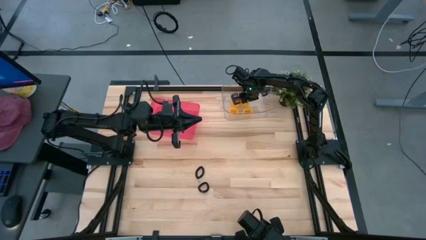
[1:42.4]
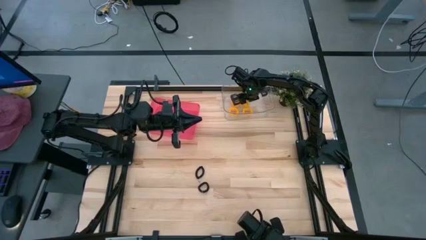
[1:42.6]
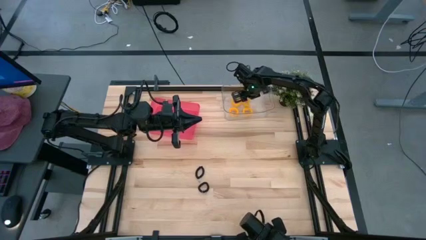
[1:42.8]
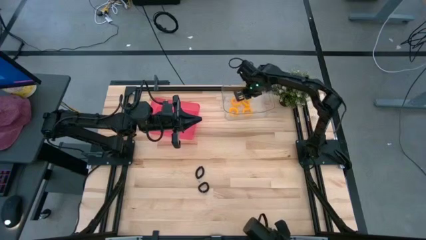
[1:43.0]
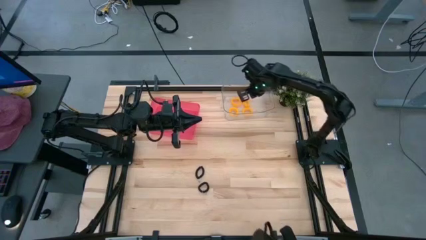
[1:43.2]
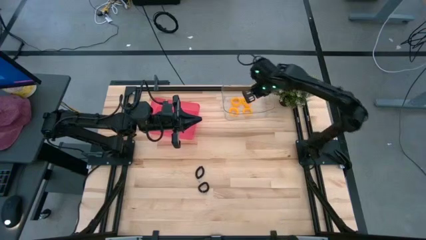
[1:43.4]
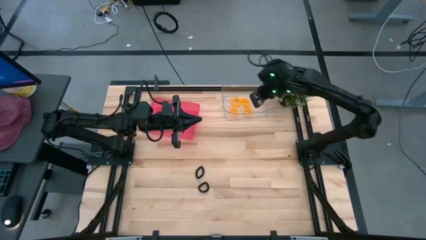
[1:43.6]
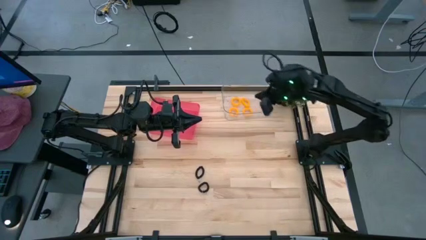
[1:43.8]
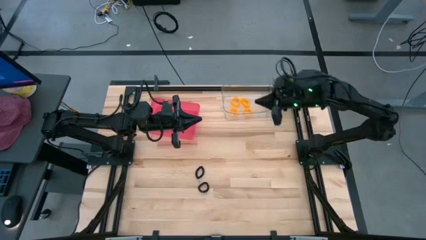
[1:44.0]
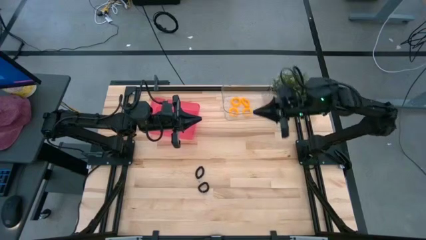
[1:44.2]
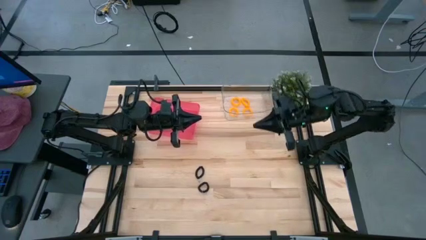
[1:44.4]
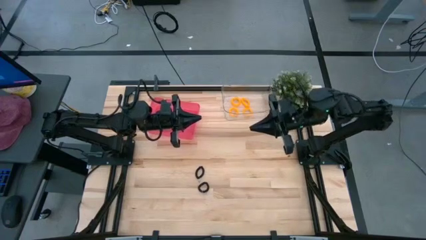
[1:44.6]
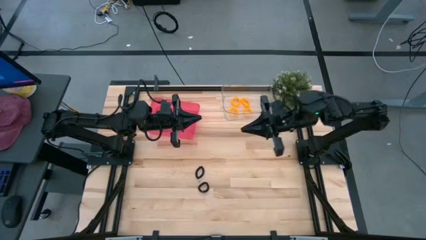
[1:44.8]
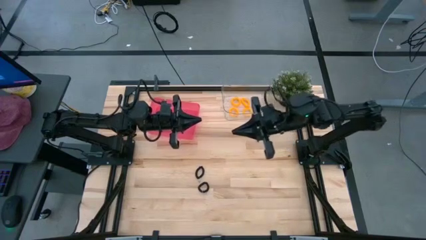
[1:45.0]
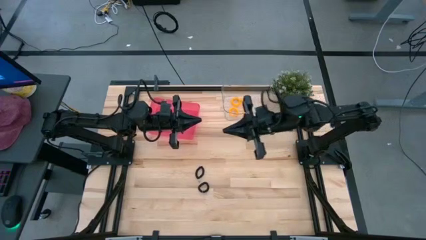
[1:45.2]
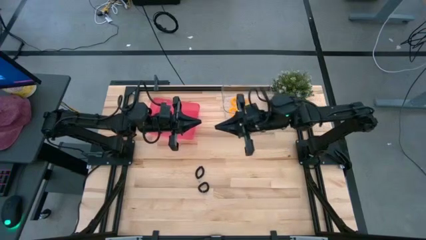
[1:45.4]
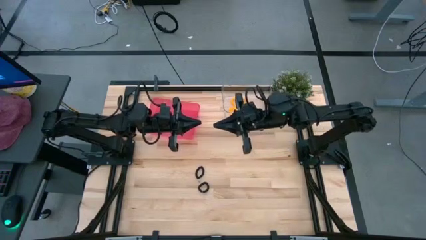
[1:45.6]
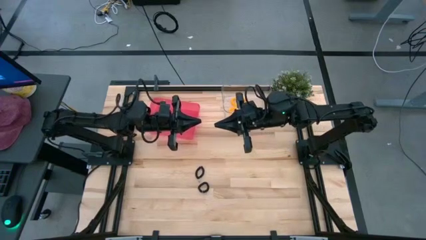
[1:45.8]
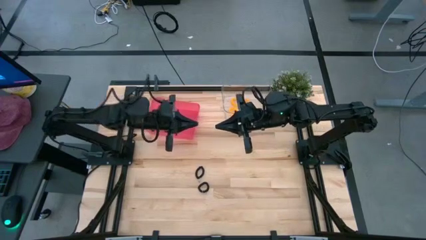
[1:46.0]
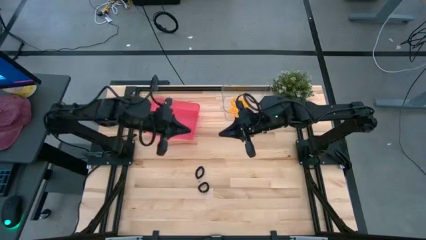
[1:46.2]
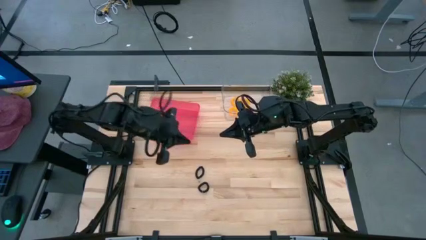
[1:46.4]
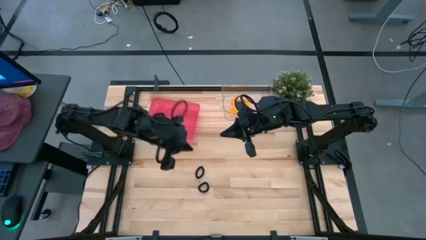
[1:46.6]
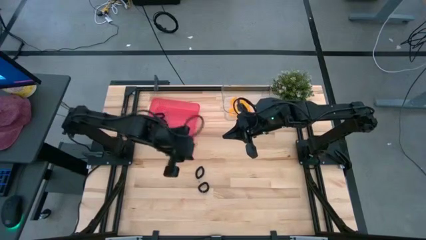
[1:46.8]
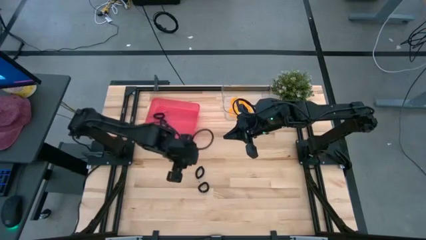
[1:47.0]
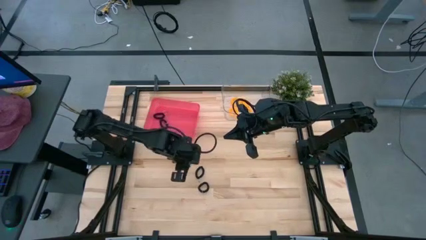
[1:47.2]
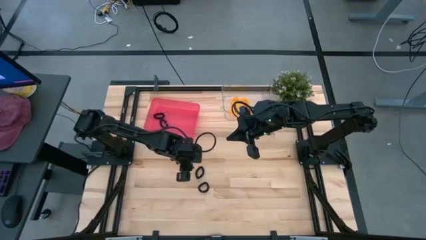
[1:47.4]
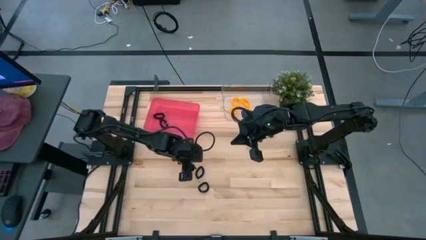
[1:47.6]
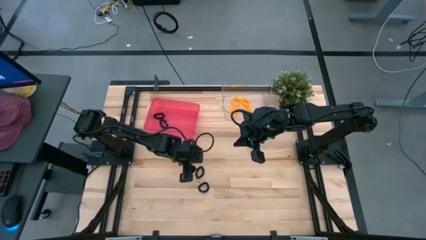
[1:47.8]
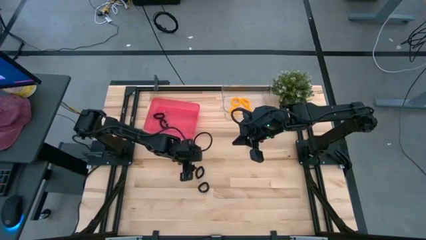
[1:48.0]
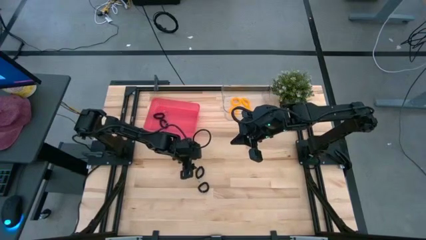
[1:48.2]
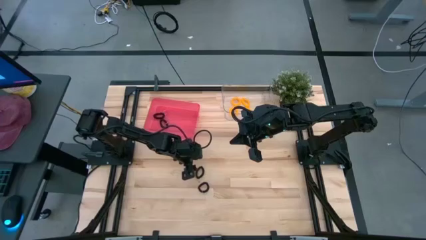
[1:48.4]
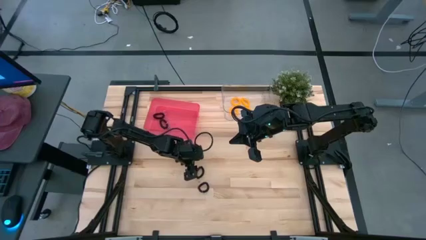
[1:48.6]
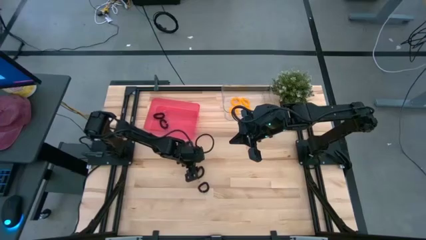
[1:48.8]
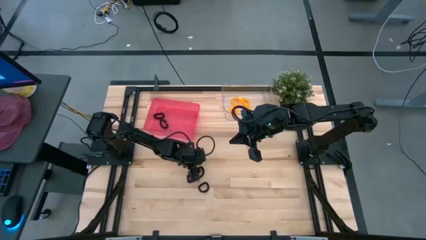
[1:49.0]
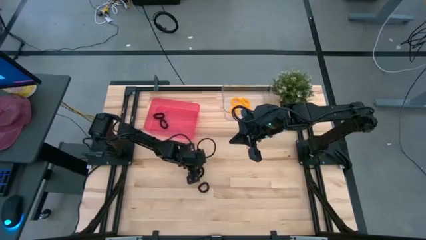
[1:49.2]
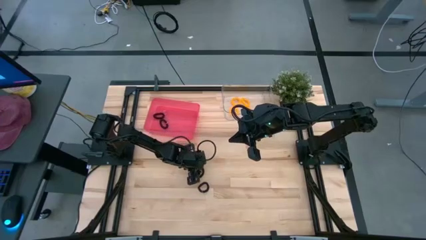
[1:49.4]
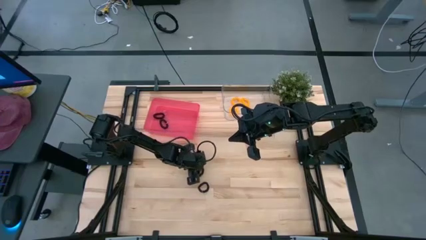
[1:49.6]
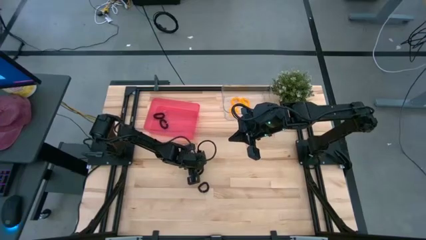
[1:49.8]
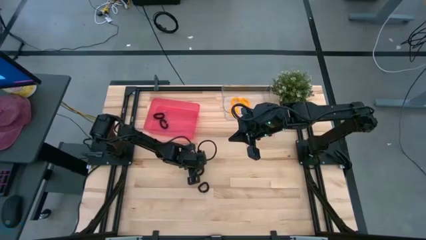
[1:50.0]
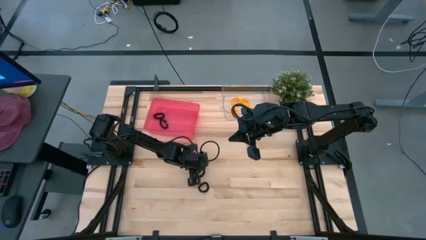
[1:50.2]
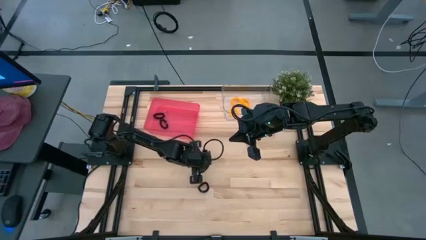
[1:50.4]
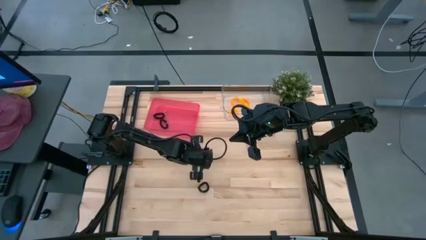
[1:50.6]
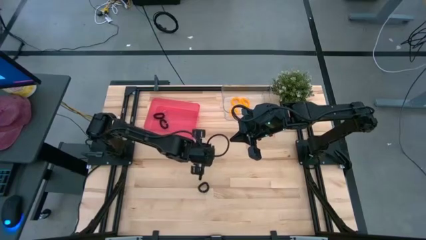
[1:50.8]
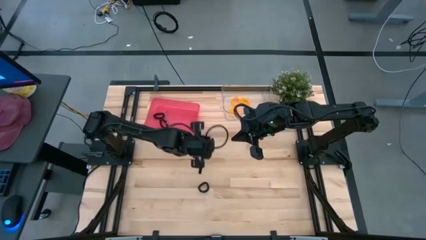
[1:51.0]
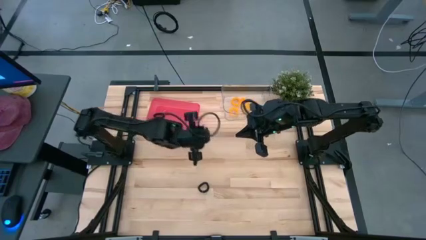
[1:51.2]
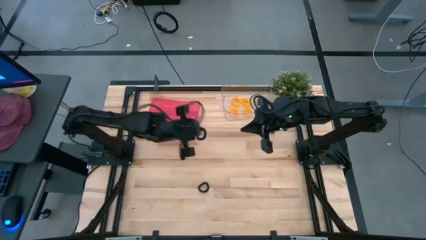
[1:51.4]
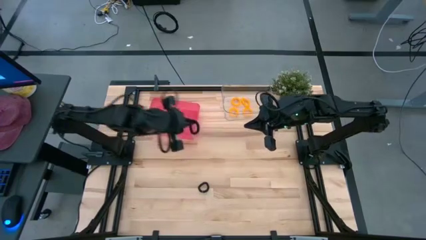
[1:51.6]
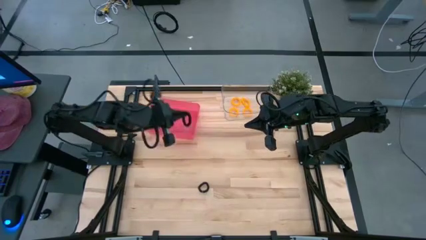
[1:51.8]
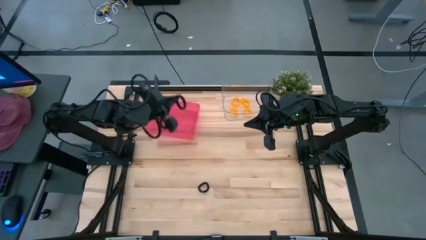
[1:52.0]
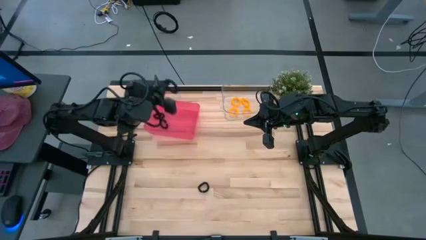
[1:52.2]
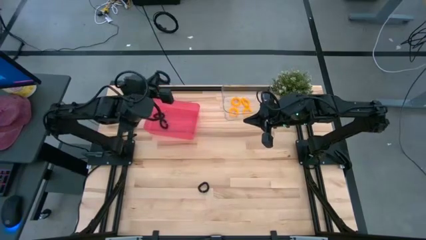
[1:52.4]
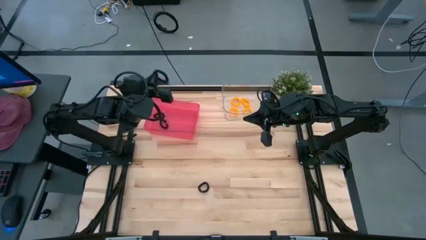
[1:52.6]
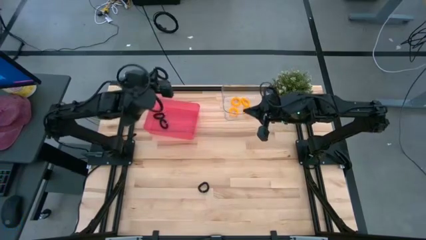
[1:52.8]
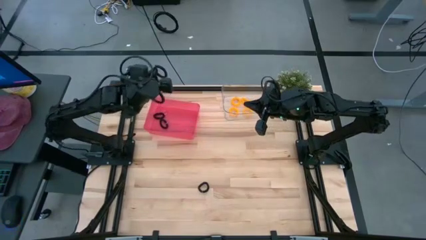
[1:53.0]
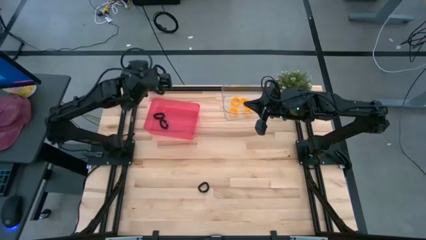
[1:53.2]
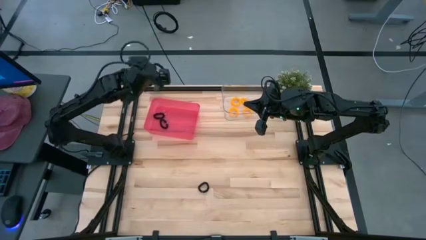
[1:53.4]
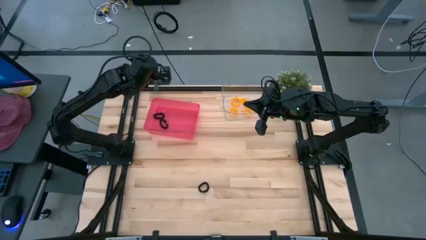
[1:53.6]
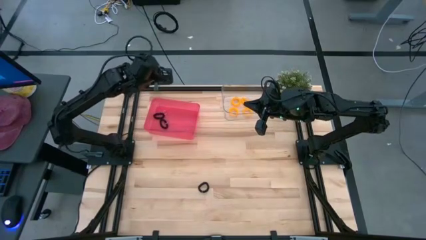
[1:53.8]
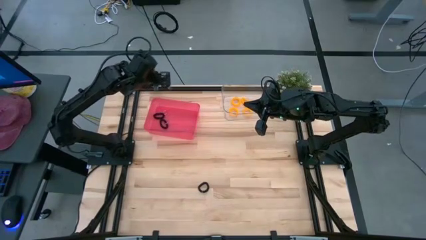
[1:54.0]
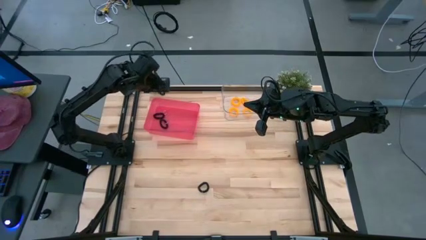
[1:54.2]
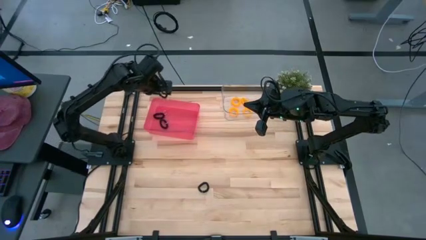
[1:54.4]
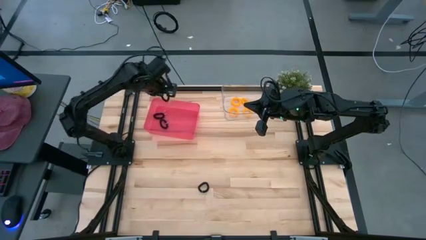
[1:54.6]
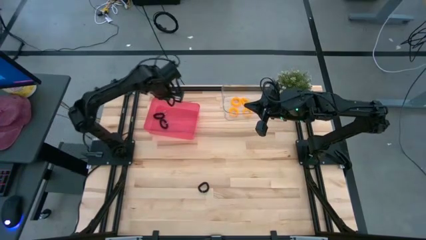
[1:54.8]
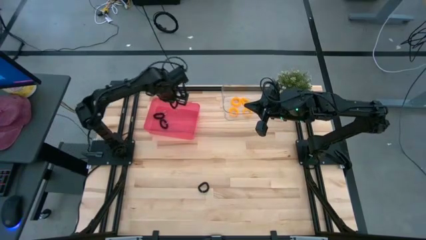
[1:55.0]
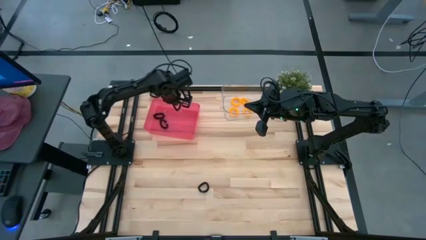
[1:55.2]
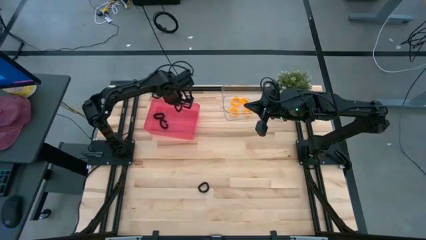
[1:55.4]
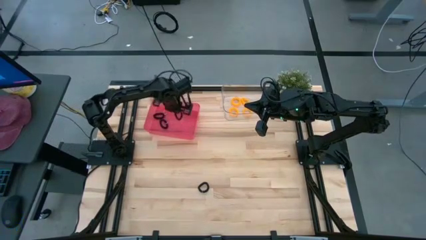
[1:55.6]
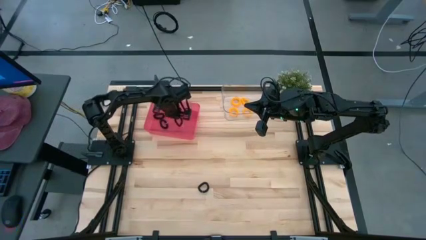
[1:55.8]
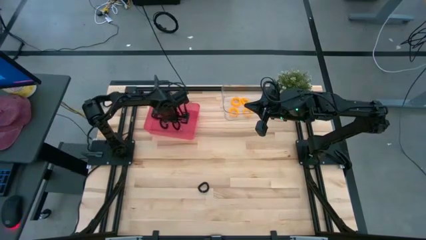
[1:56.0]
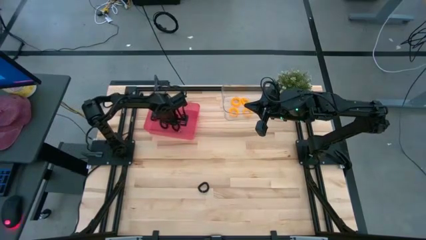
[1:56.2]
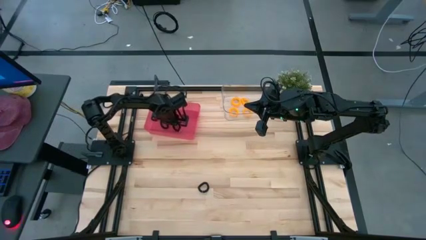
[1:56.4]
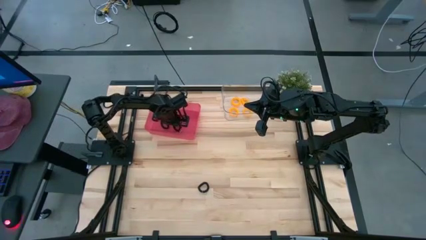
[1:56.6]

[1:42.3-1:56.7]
Task: Sort spring keychains
Put the black spring keychain into the pink bin
